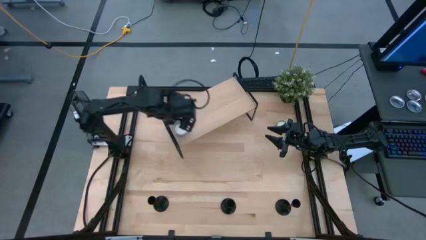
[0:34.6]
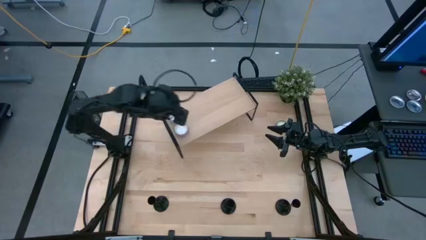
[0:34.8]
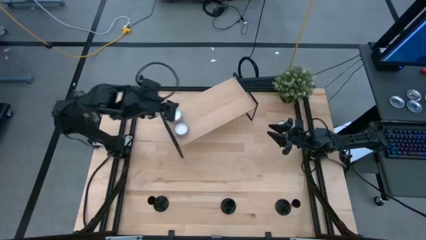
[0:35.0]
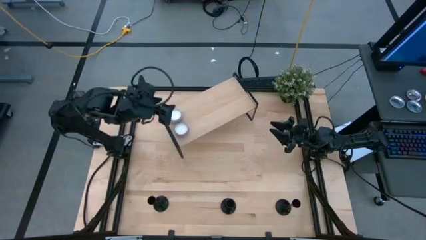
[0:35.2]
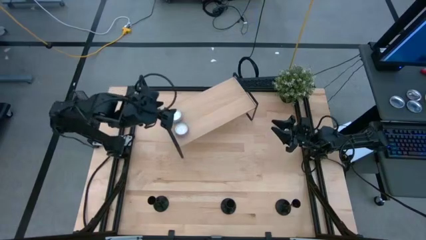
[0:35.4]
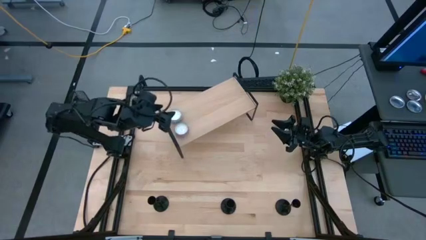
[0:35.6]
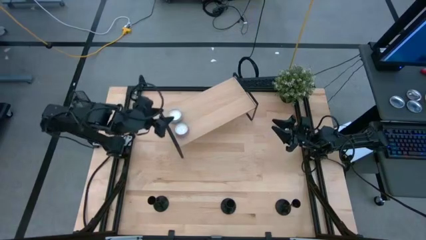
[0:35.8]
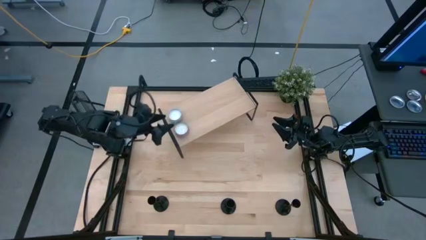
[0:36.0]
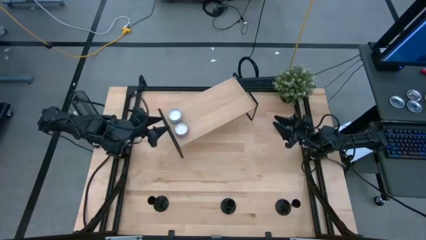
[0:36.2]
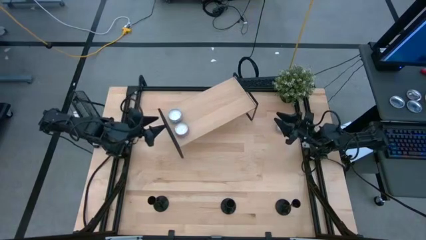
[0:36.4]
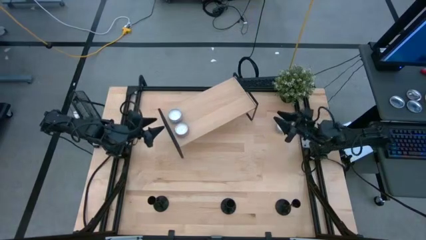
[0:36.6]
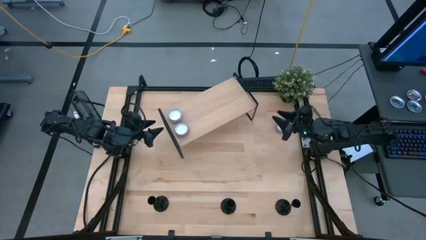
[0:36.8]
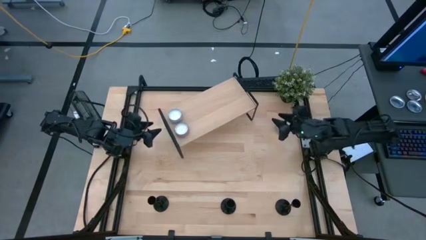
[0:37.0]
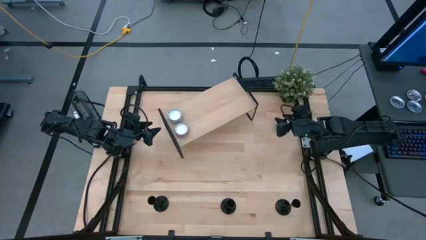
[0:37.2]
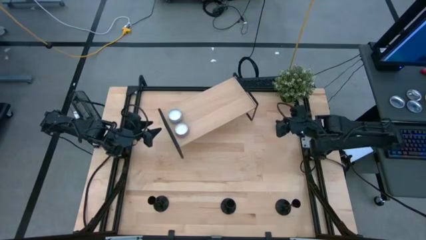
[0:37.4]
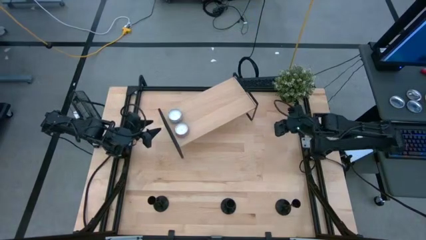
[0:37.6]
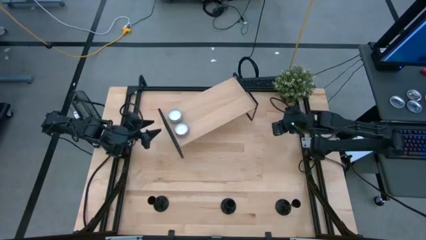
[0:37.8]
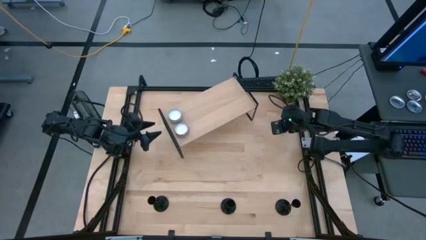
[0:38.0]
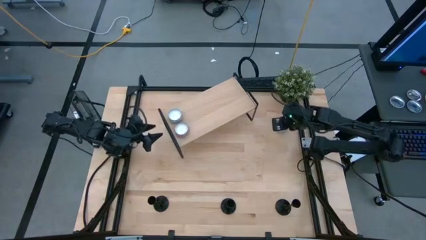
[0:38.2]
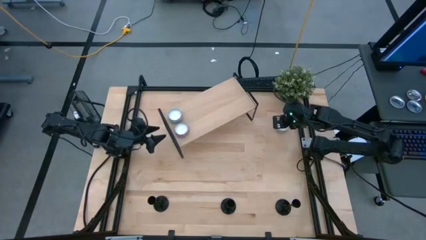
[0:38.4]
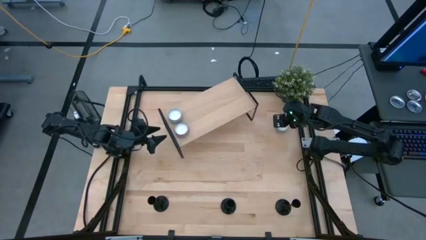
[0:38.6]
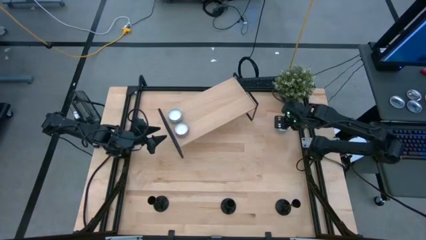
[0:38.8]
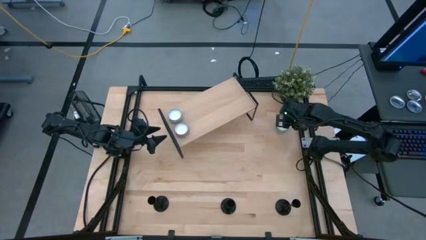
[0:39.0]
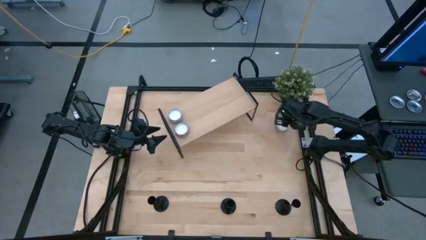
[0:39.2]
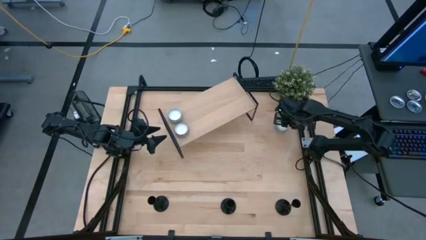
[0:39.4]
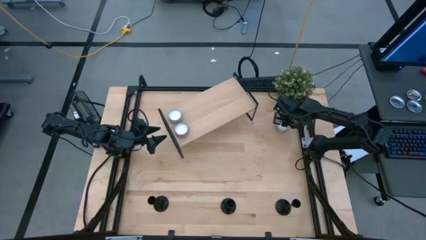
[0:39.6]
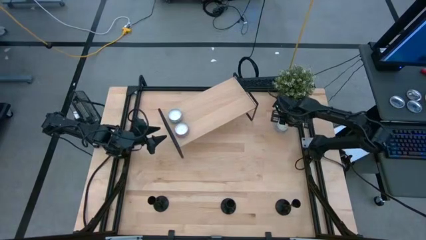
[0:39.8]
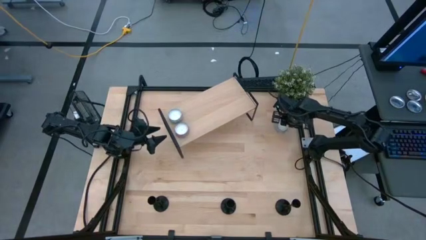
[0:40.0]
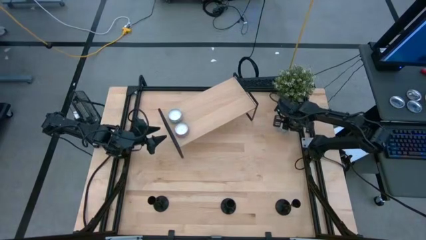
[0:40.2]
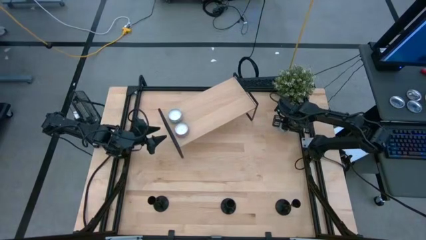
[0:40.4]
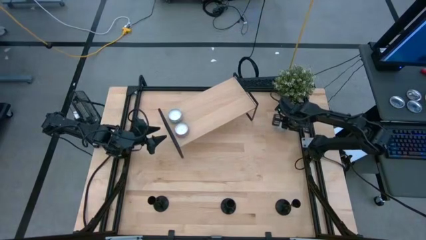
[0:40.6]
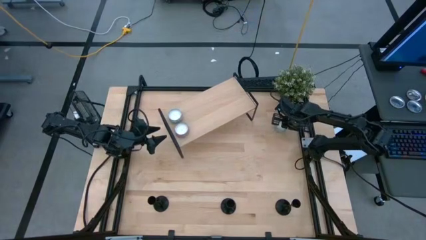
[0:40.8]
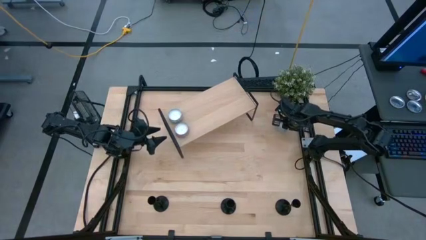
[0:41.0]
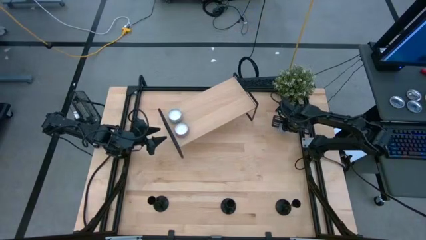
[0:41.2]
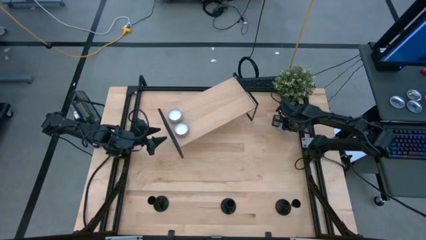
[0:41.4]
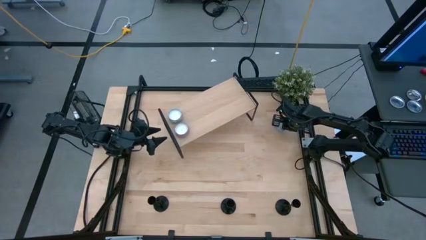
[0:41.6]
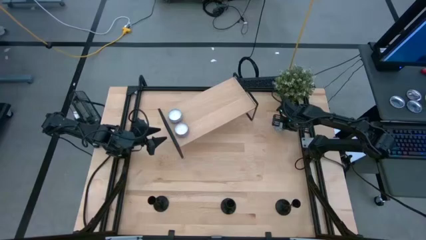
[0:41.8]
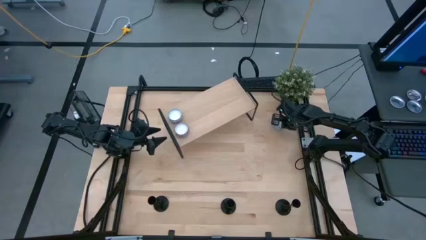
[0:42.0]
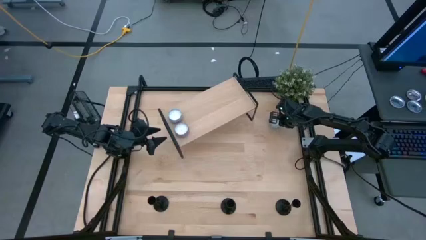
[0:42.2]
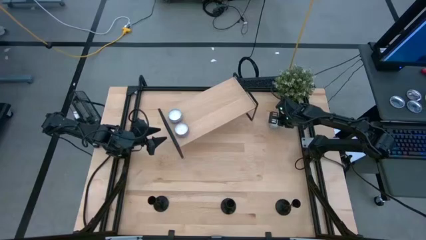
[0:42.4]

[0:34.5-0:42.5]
Task: Pick & Place candle stick holders
Put the blue patterned scented candle on the shelf

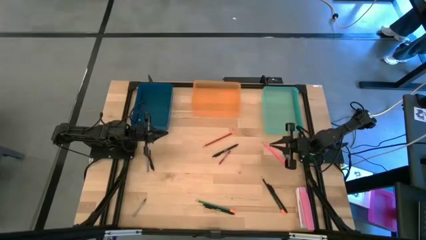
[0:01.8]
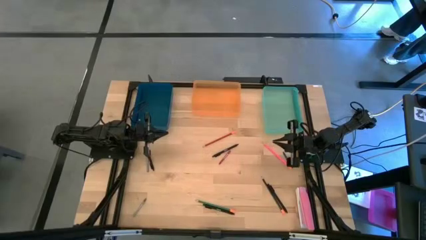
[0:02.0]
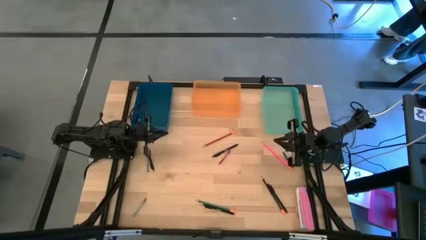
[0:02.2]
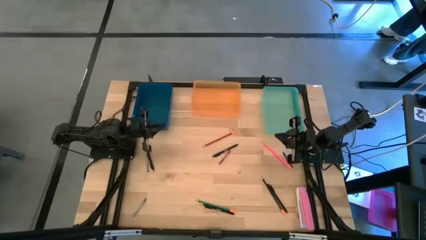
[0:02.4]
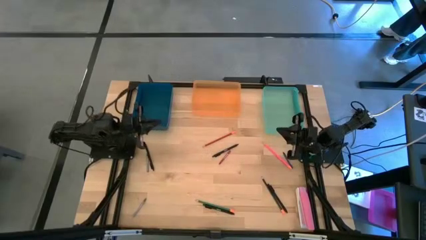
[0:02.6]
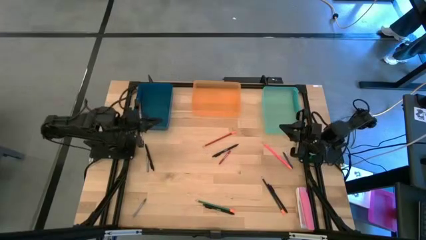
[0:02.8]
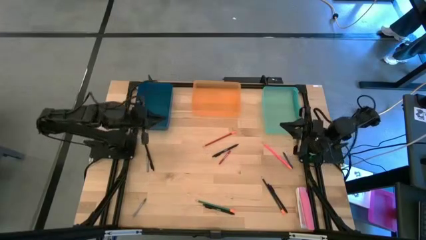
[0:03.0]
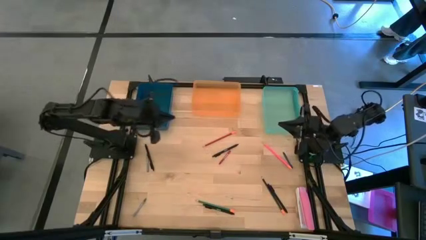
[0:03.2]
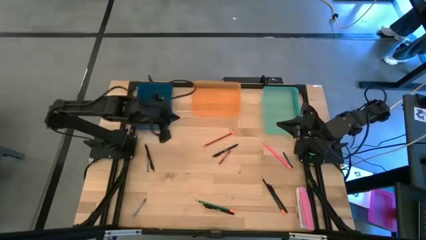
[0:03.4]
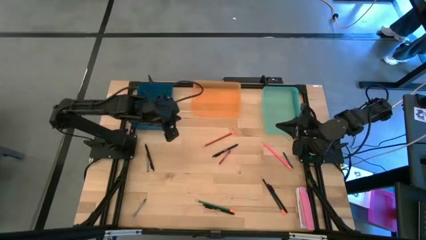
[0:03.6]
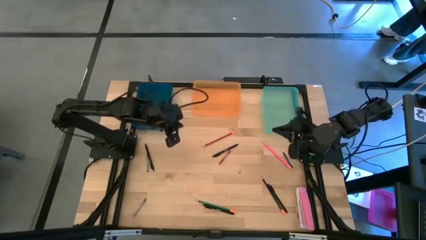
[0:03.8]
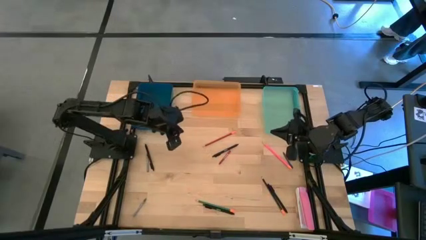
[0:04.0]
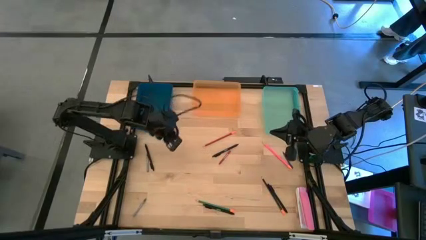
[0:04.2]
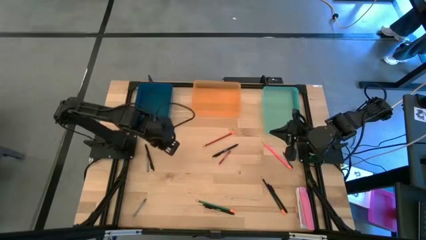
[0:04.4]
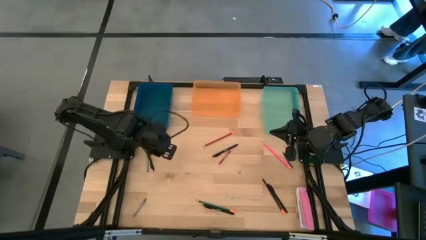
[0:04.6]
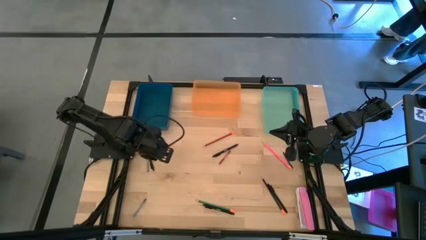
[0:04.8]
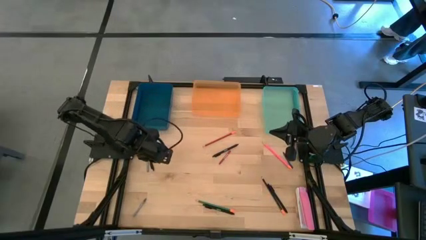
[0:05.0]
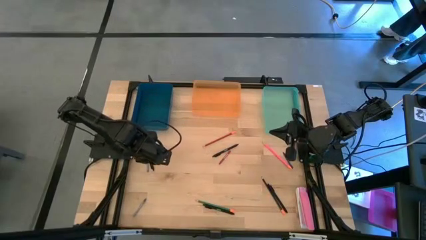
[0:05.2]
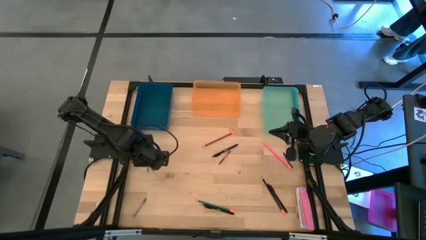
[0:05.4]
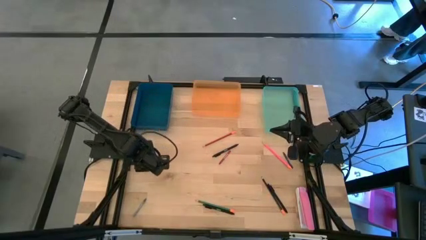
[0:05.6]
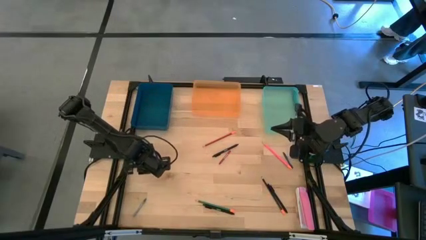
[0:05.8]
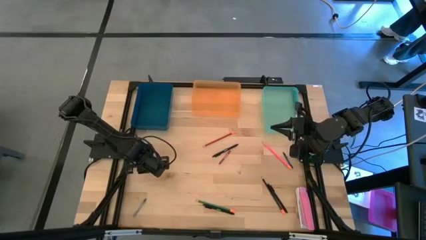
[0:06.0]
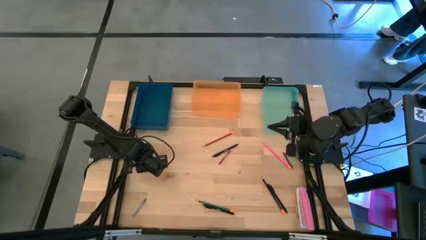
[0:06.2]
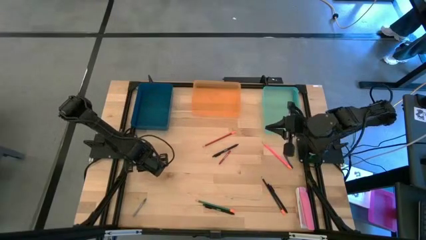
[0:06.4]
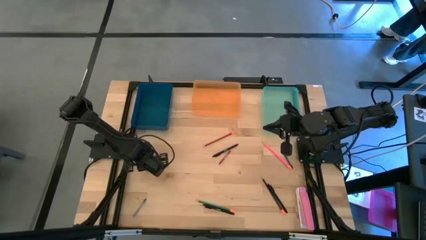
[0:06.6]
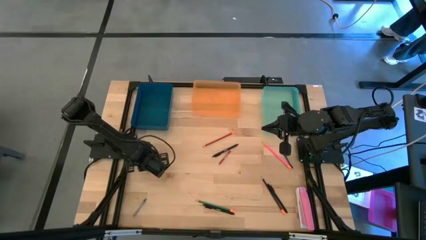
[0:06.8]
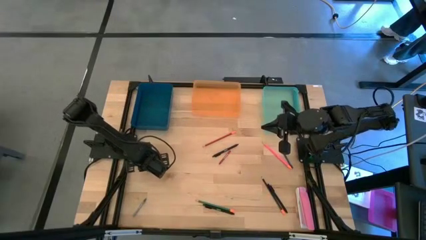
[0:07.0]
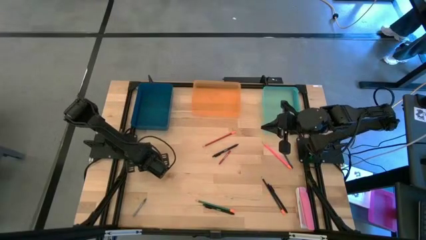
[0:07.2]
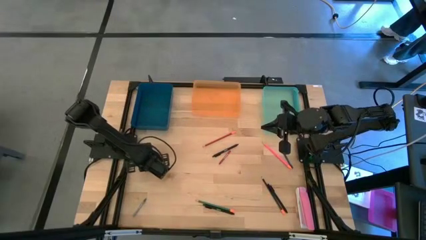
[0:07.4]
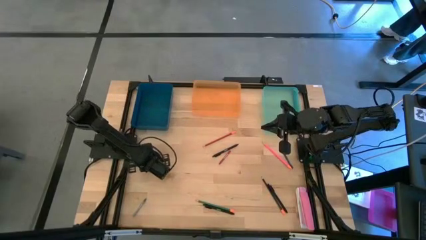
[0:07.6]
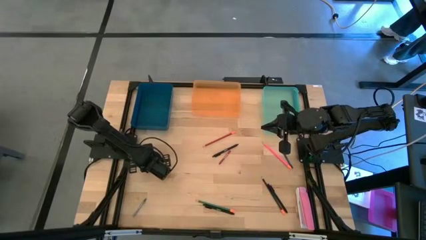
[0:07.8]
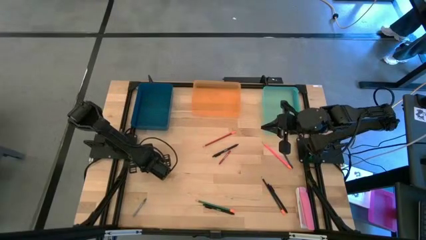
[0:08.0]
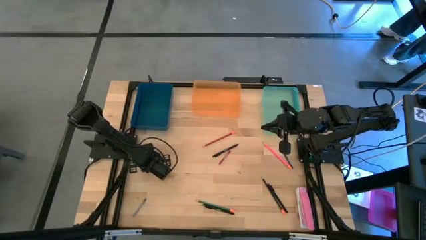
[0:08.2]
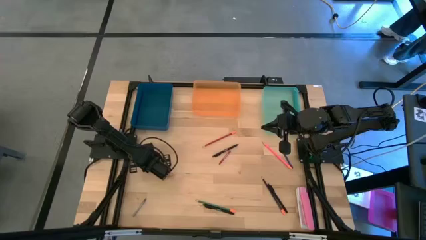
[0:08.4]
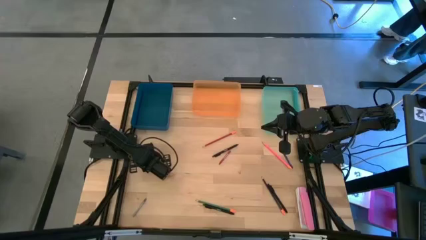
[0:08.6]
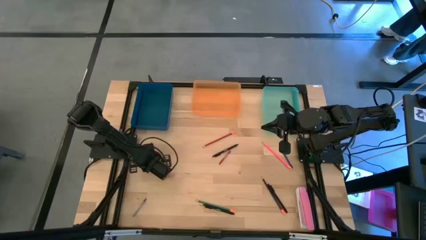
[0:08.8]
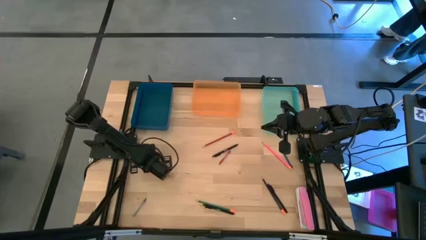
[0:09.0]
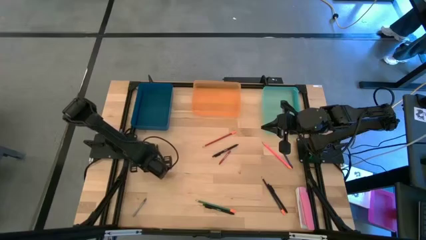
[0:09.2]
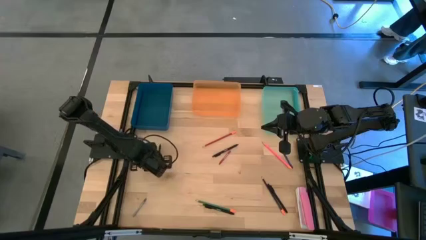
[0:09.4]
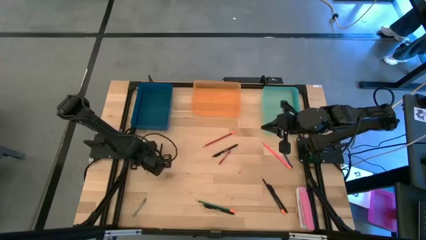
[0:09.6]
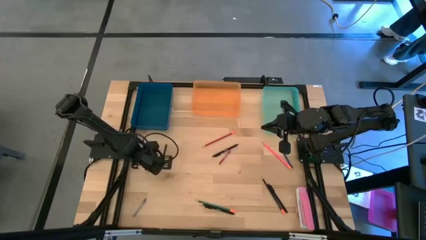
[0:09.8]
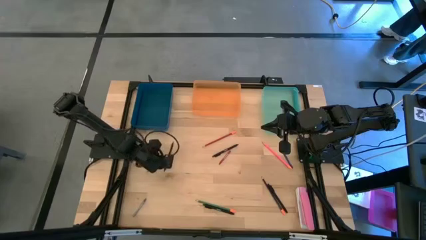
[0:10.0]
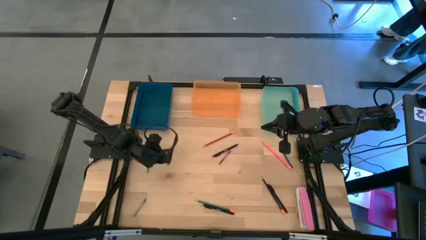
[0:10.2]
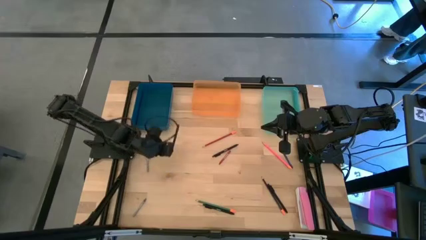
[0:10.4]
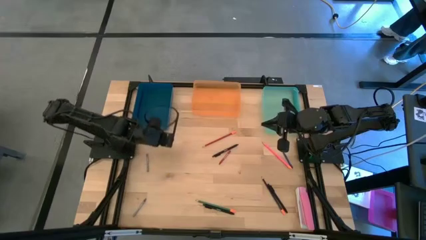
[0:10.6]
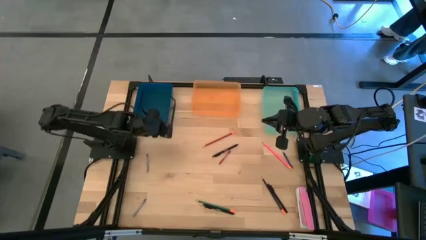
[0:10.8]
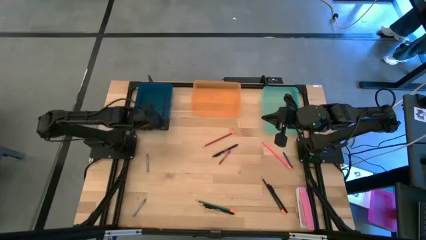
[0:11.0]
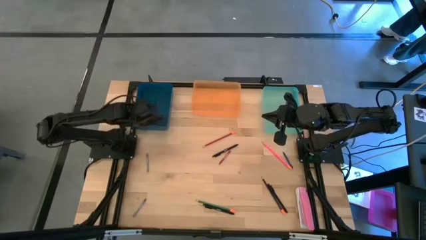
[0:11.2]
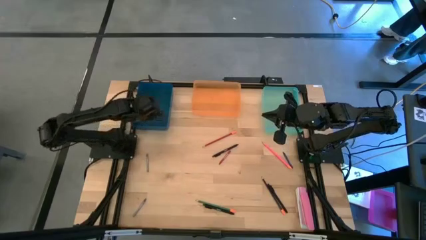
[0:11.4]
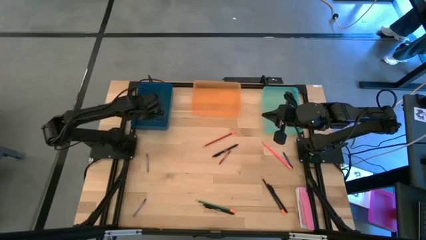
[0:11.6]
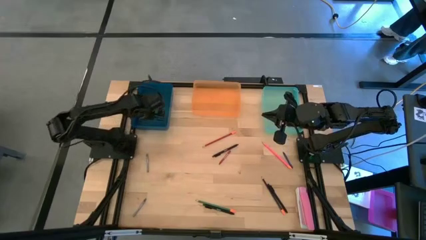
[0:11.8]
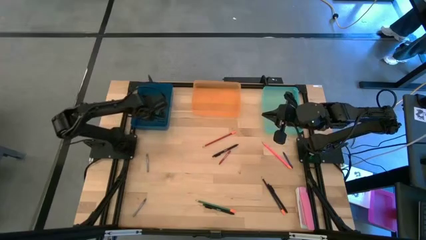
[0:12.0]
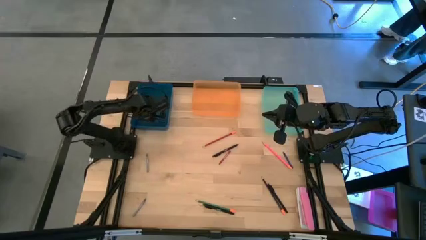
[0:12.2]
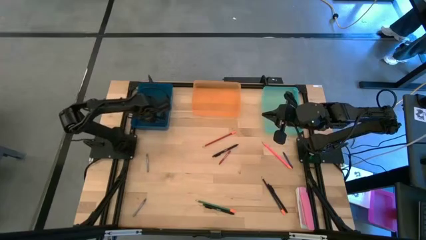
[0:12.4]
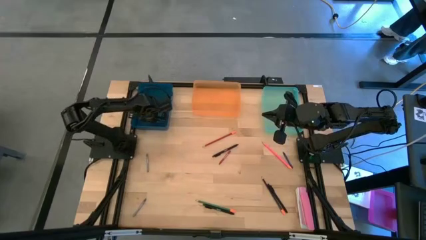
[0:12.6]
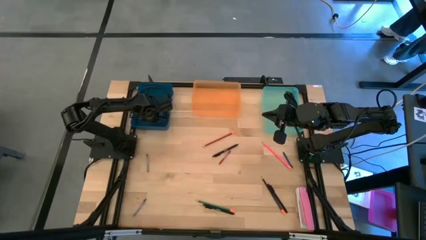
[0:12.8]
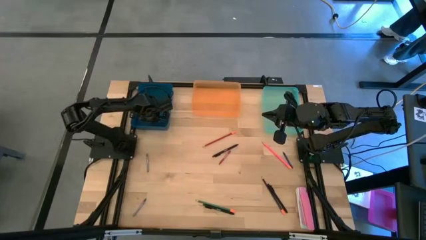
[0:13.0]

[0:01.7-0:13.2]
Task: Sort crayons/erasers/pens/pencils in bins
Put the black pen into the blue bin
